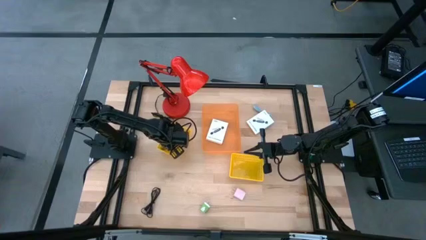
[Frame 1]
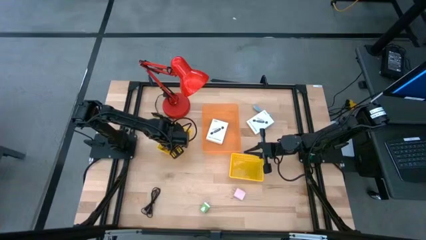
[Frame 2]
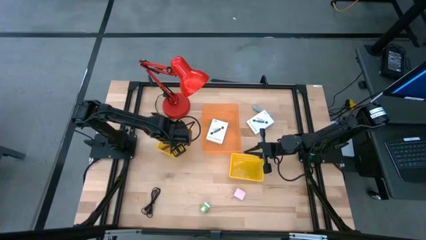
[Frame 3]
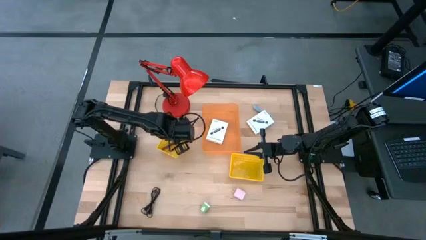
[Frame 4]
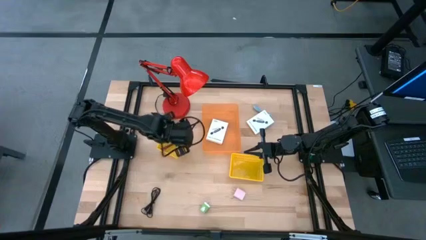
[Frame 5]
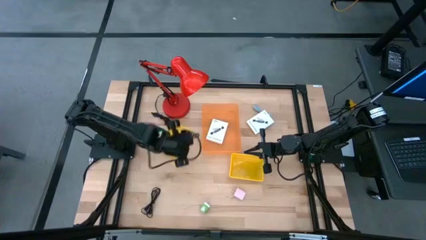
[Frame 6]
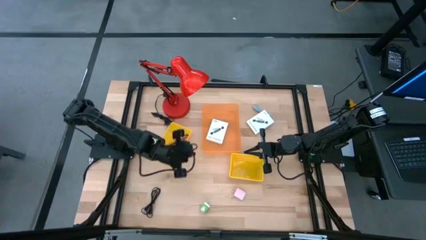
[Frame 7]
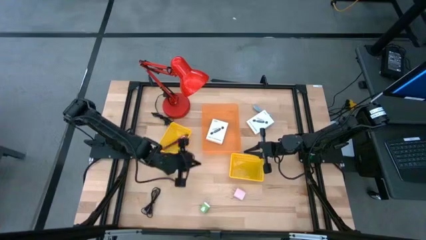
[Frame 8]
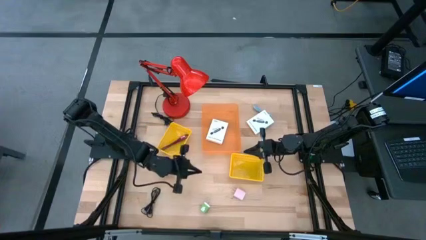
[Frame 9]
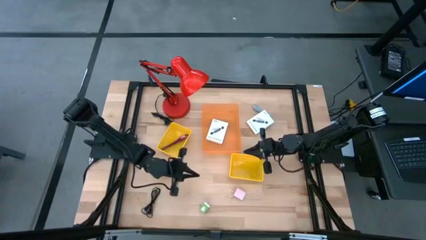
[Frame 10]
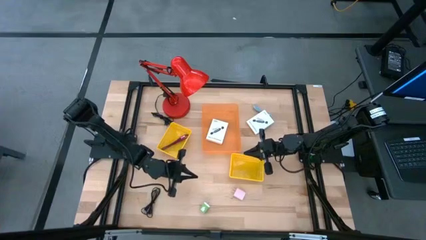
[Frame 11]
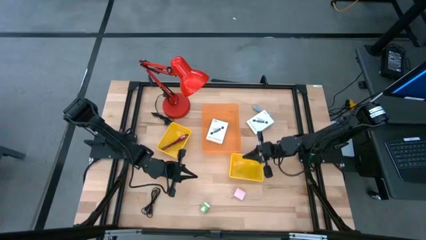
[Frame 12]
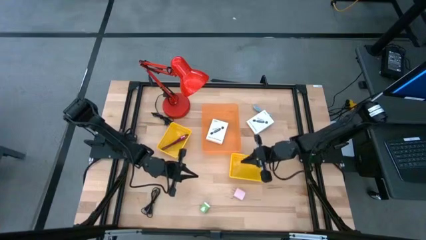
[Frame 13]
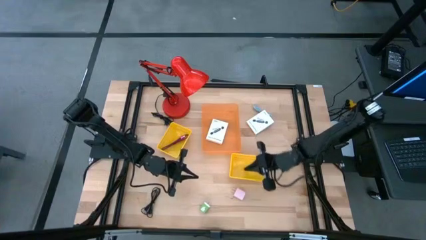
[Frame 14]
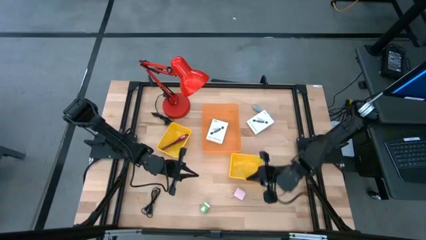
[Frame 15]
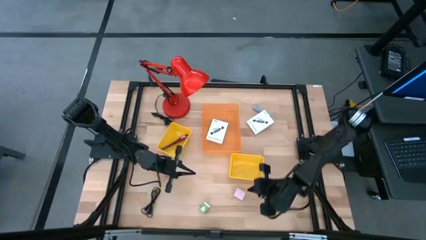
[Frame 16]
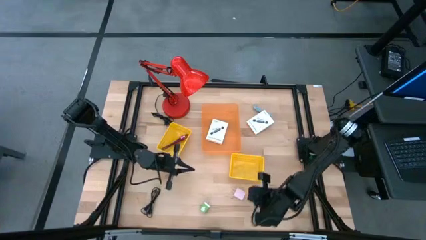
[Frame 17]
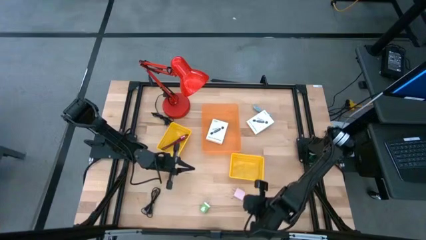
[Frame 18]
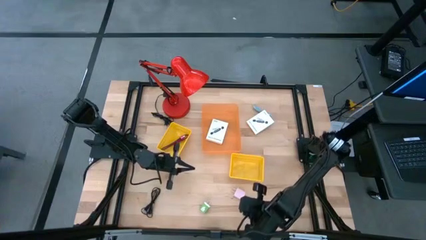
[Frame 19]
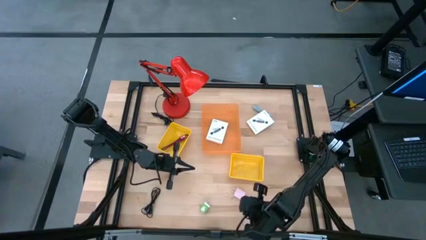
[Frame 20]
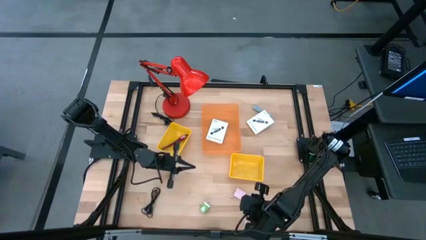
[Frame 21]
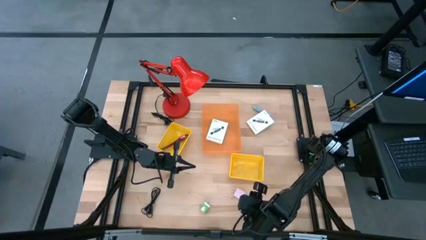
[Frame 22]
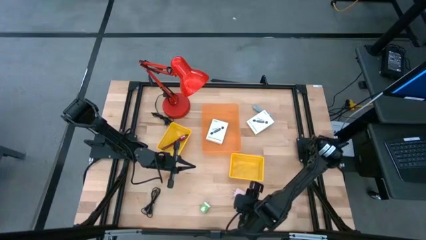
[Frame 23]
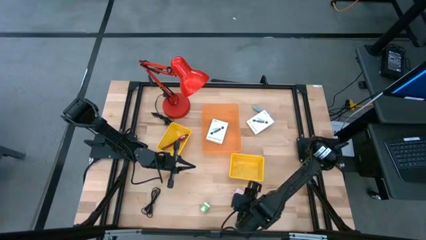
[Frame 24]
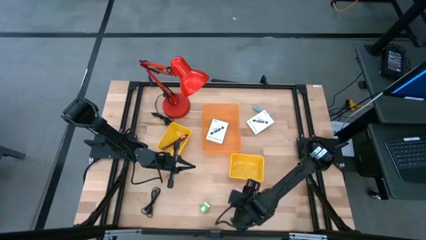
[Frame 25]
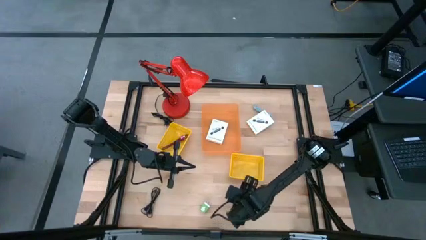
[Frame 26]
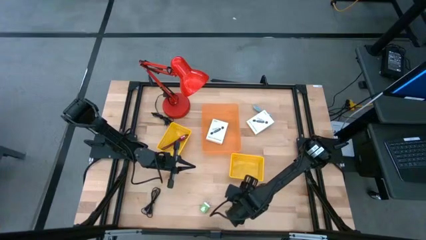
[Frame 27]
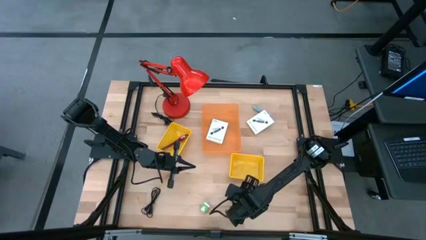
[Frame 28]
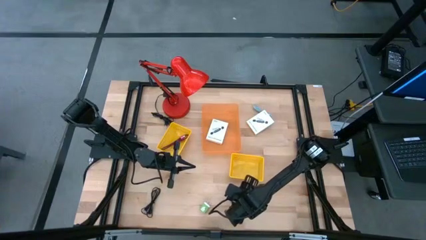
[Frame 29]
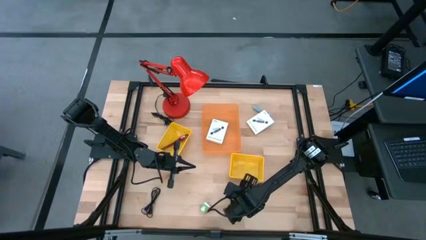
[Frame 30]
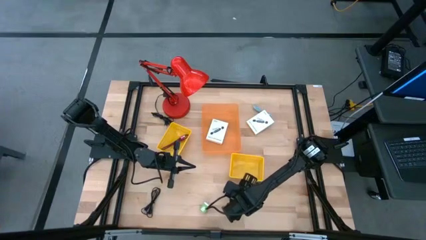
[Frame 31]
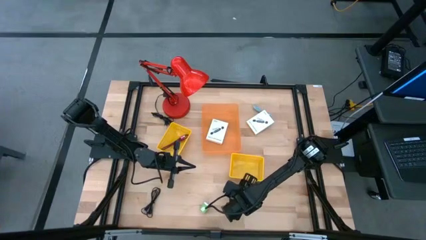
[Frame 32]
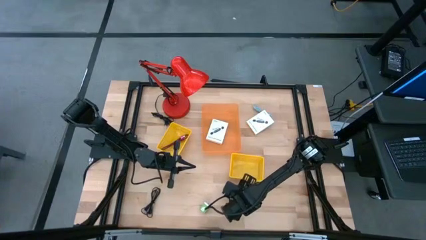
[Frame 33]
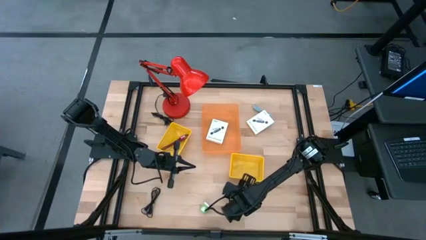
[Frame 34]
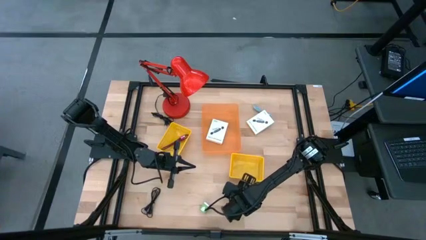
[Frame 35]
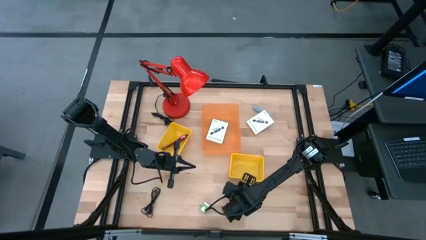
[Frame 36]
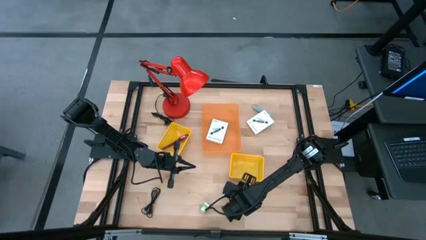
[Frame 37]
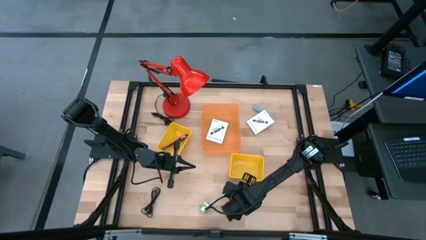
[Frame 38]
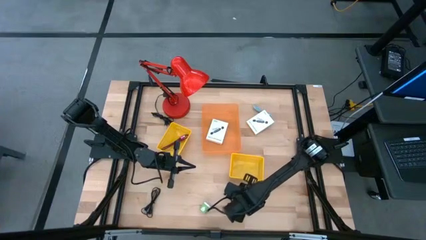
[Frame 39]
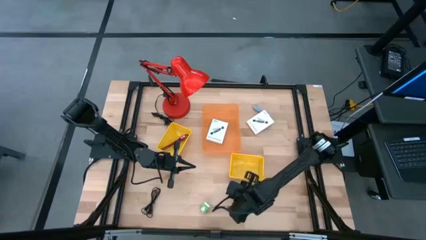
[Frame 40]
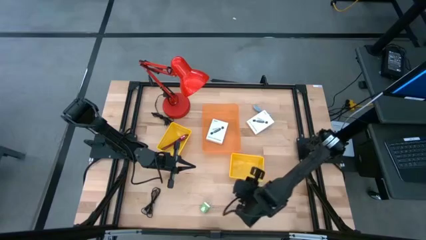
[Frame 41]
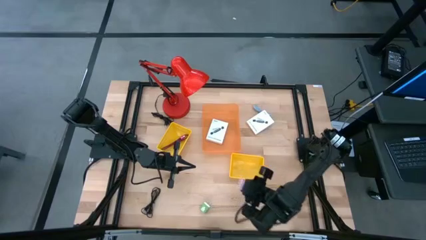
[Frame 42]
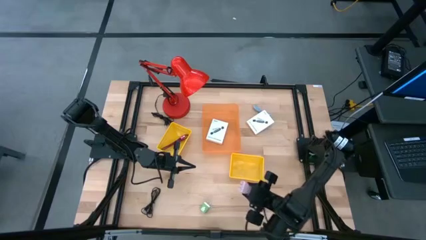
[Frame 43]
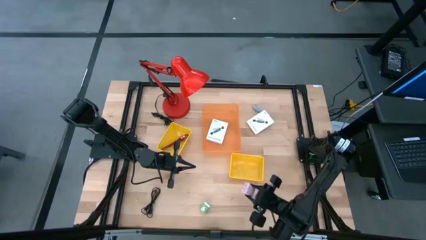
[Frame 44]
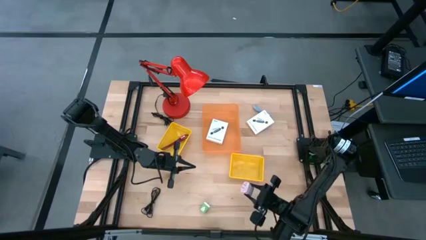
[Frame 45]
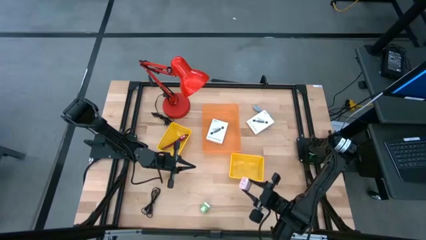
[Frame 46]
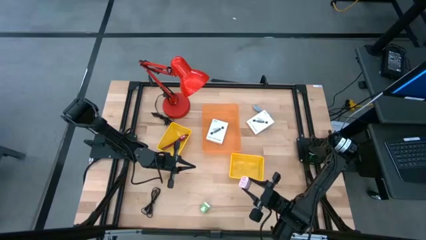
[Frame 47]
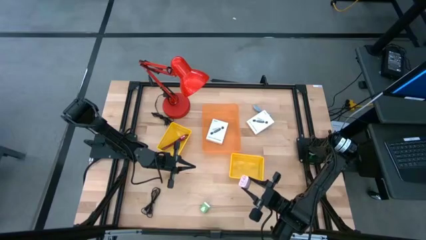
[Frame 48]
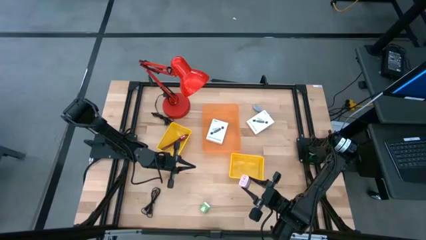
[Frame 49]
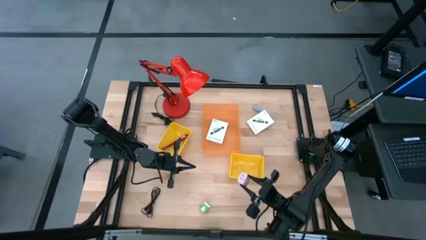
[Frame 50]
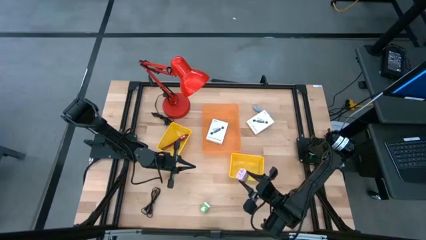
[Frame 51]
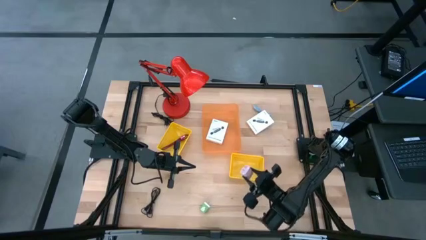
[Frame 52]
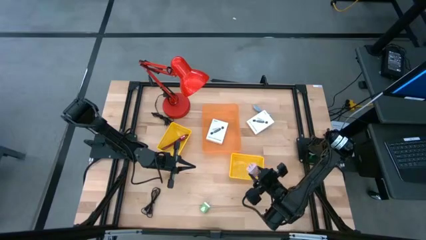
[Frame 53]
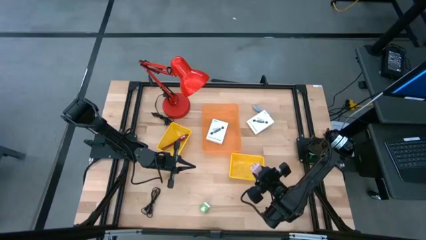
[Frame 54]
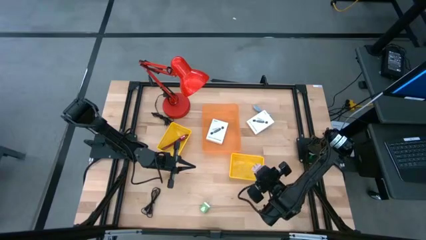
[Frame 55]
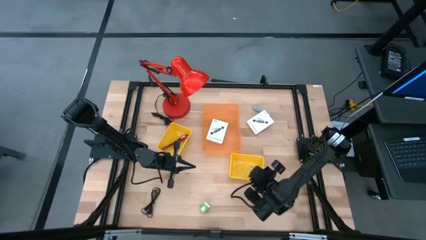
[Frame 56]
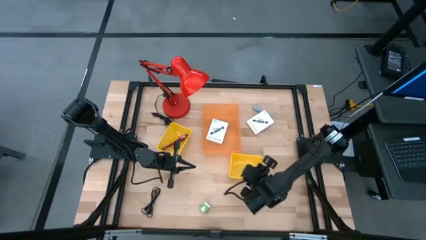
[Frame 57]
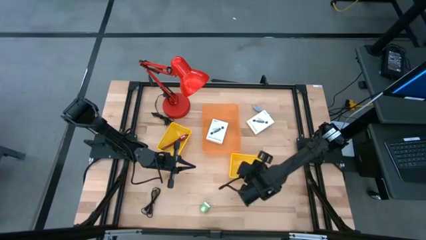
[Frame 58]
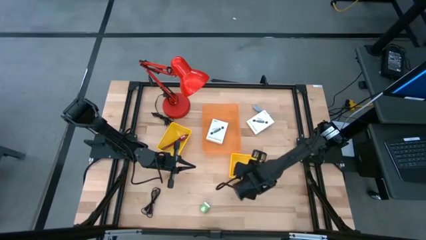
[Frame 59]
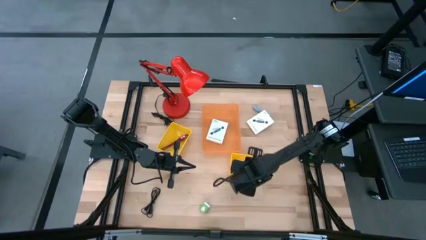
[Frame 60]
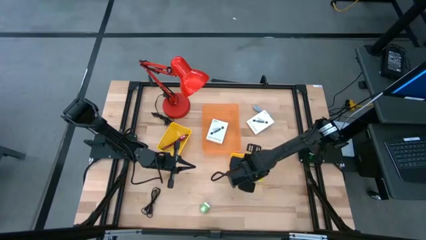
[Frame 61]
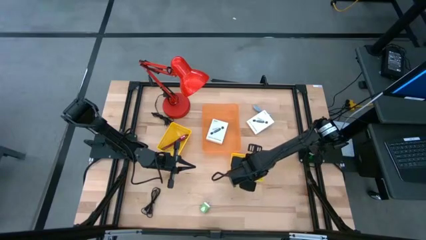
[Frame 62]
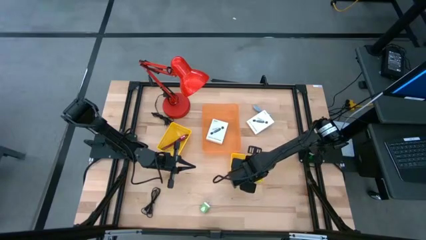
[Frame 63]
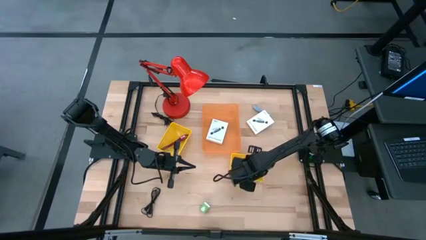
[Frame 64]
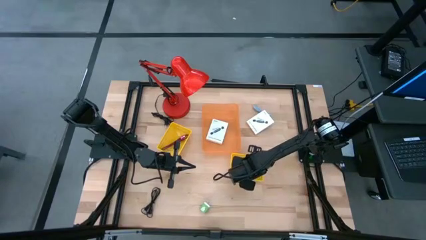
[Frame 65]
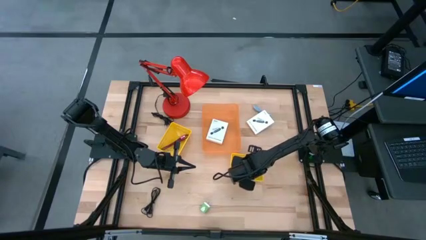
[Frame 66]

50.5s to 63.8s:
Task: Pick and place items into bin
Put the pink charger adapter into the right yellow bin
